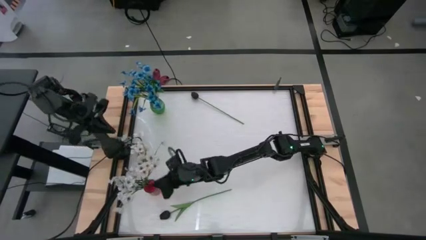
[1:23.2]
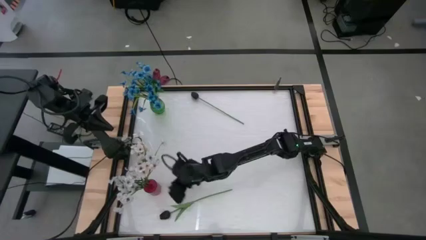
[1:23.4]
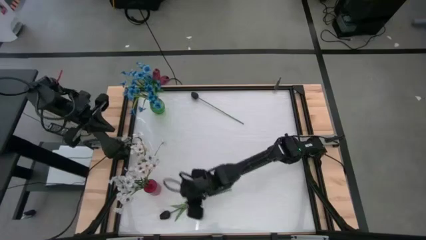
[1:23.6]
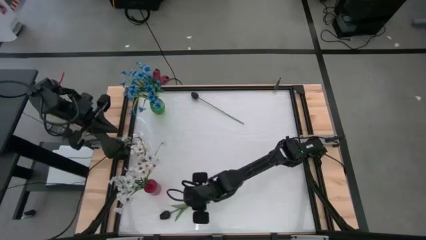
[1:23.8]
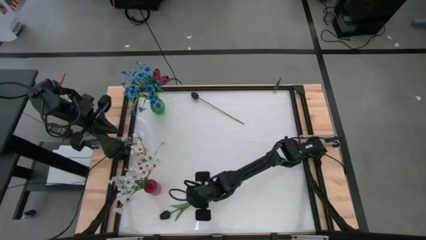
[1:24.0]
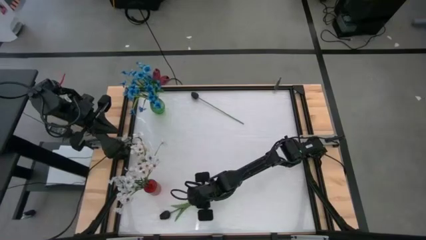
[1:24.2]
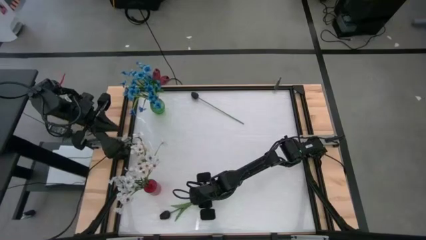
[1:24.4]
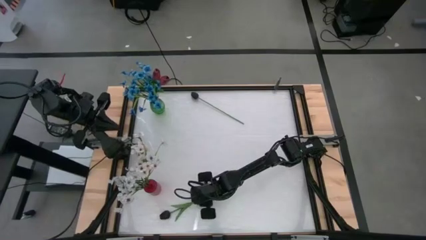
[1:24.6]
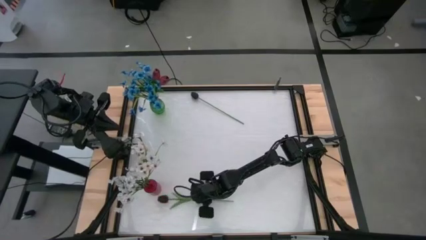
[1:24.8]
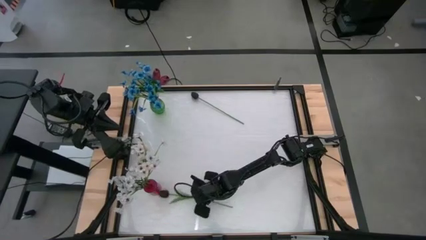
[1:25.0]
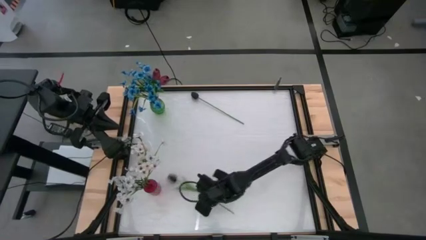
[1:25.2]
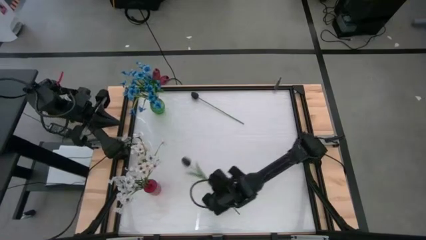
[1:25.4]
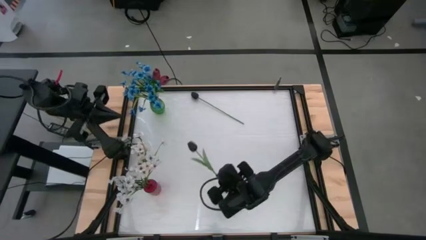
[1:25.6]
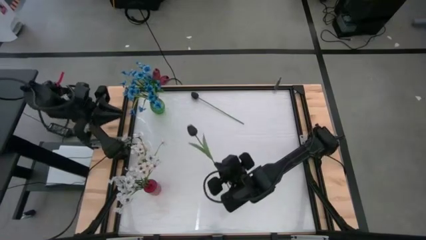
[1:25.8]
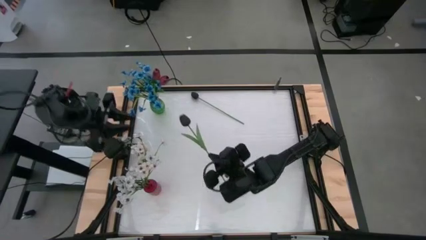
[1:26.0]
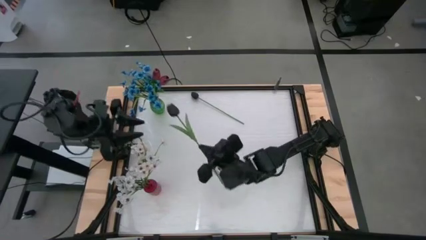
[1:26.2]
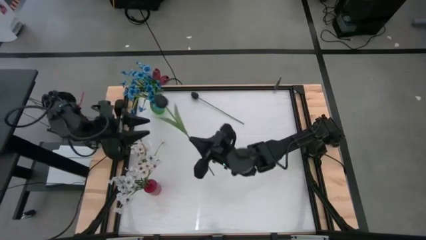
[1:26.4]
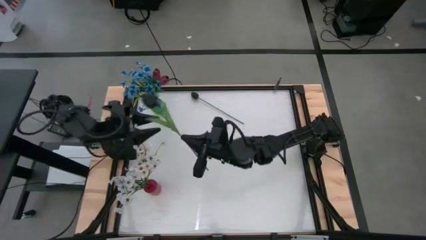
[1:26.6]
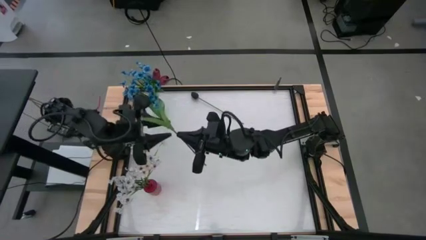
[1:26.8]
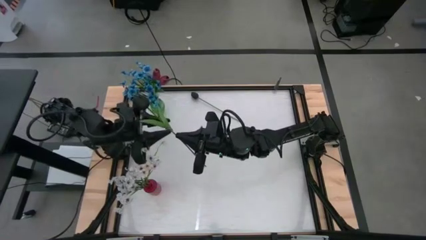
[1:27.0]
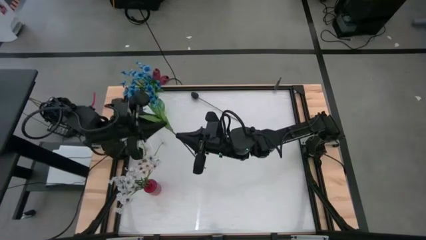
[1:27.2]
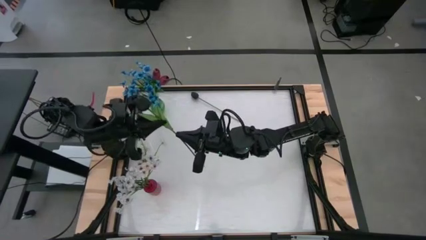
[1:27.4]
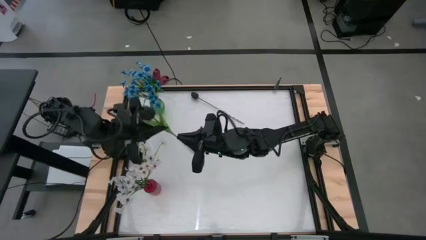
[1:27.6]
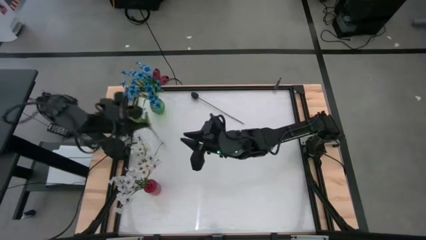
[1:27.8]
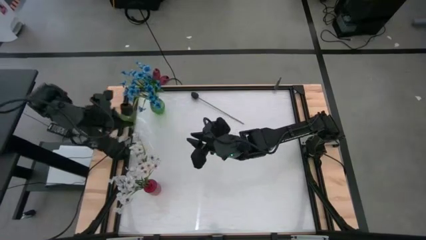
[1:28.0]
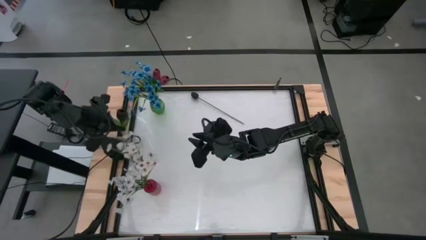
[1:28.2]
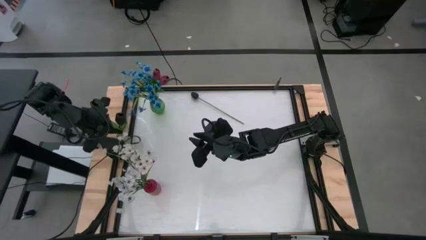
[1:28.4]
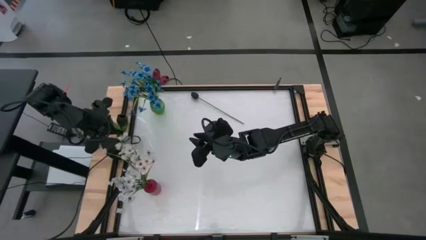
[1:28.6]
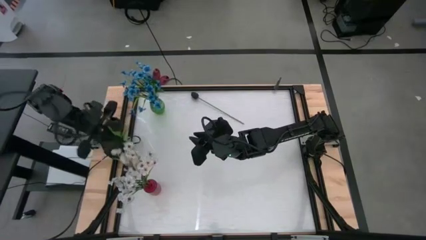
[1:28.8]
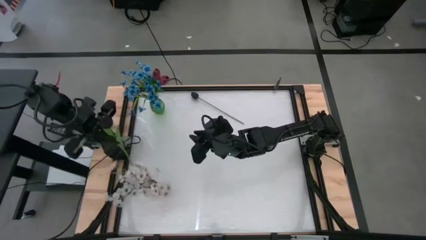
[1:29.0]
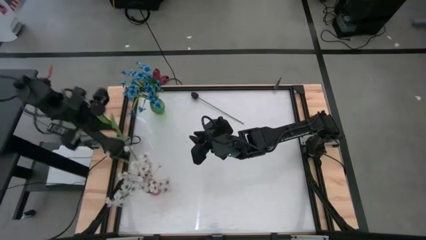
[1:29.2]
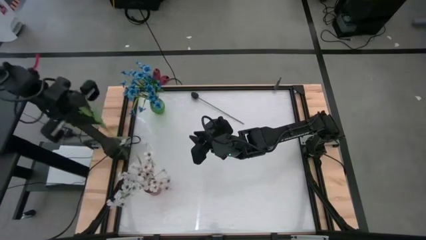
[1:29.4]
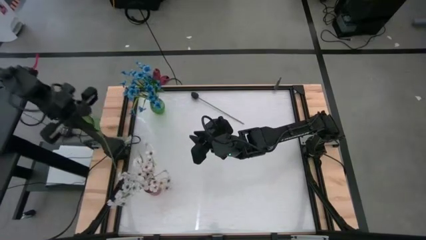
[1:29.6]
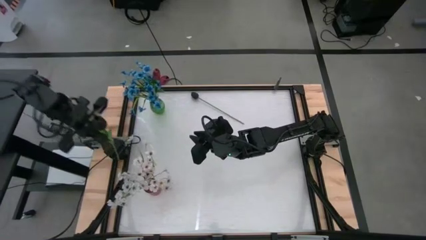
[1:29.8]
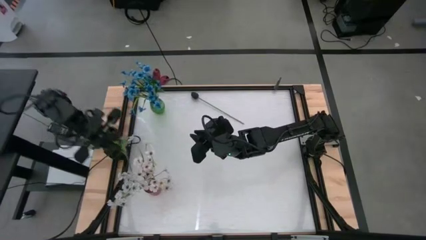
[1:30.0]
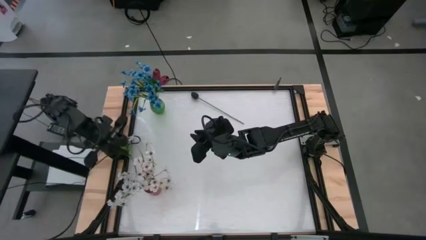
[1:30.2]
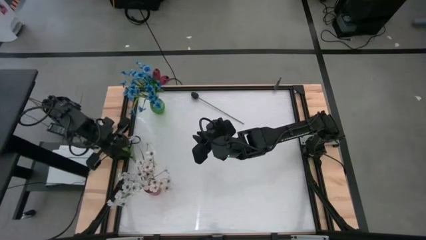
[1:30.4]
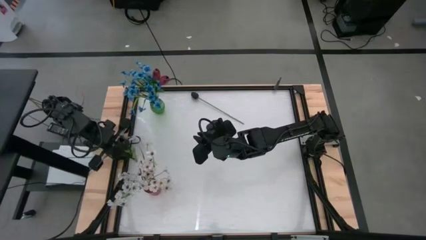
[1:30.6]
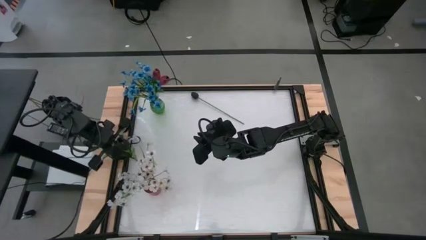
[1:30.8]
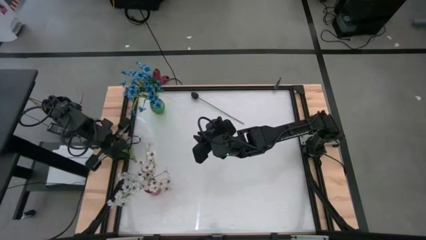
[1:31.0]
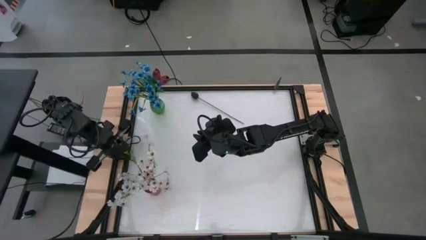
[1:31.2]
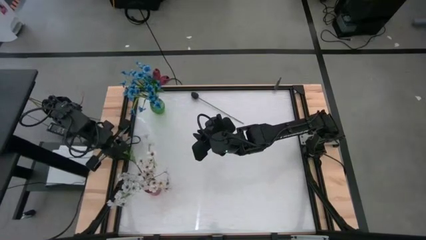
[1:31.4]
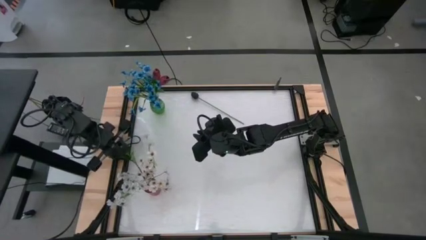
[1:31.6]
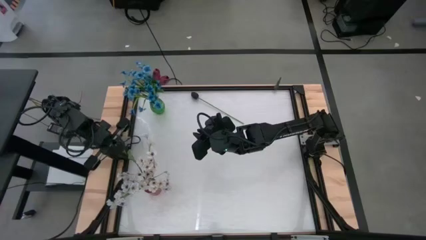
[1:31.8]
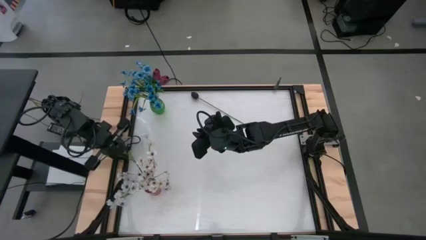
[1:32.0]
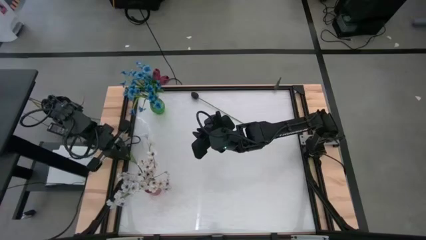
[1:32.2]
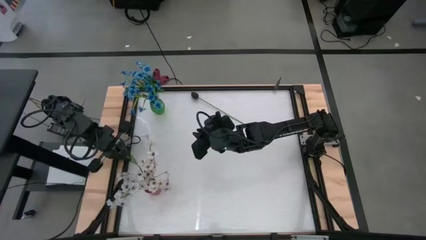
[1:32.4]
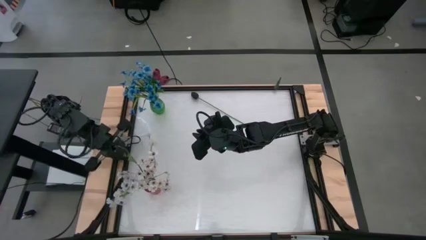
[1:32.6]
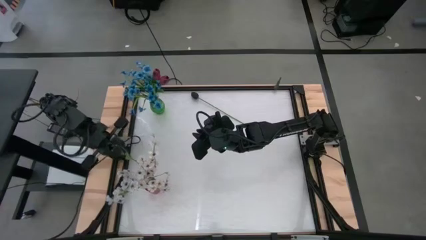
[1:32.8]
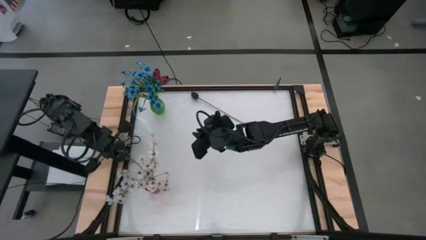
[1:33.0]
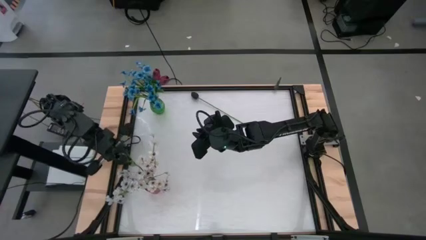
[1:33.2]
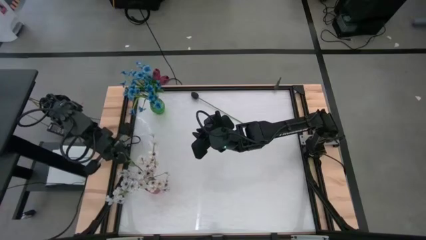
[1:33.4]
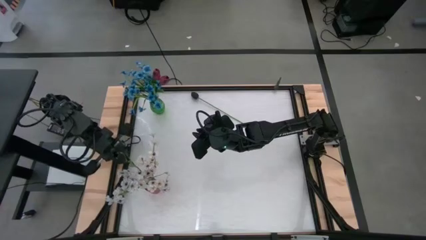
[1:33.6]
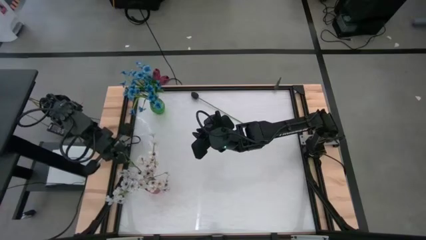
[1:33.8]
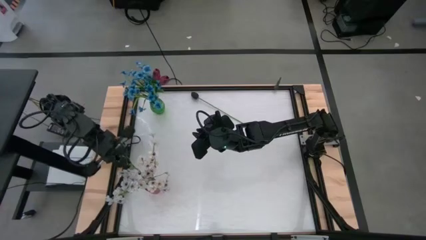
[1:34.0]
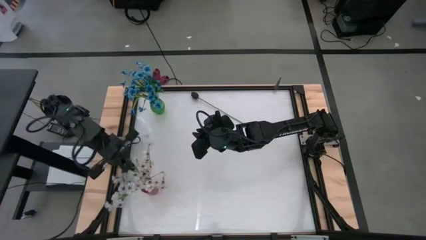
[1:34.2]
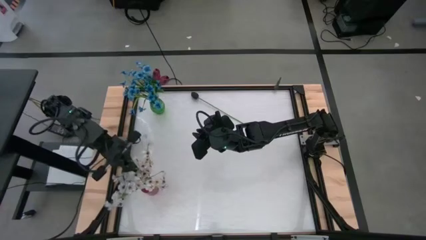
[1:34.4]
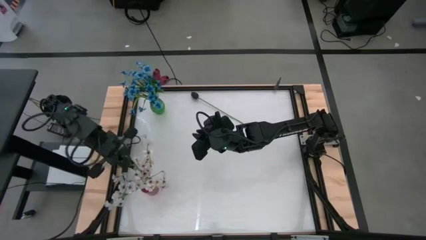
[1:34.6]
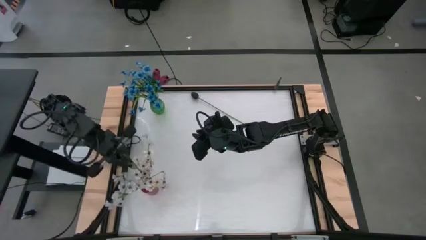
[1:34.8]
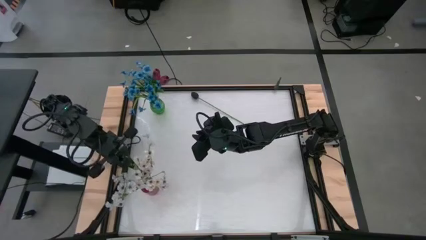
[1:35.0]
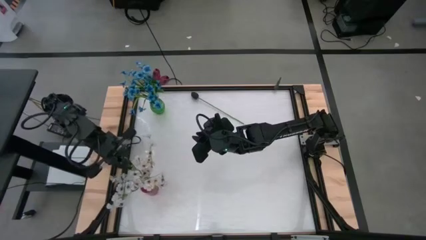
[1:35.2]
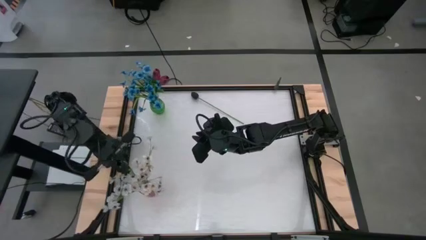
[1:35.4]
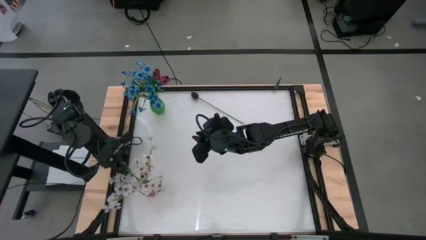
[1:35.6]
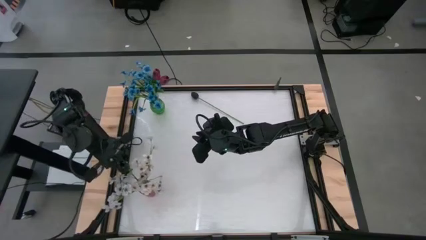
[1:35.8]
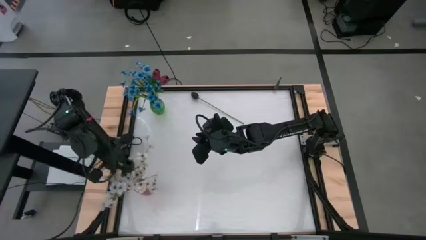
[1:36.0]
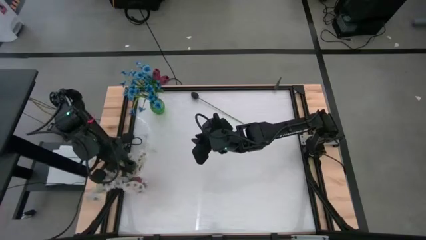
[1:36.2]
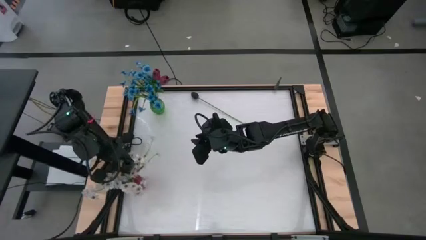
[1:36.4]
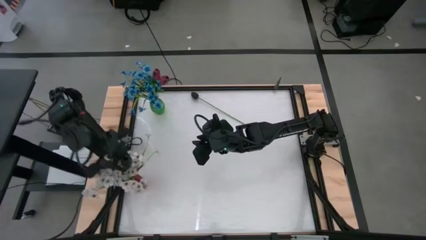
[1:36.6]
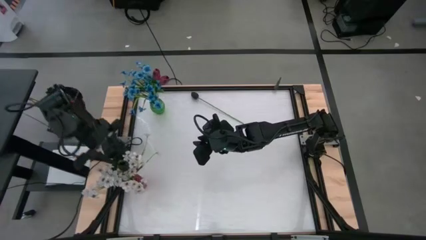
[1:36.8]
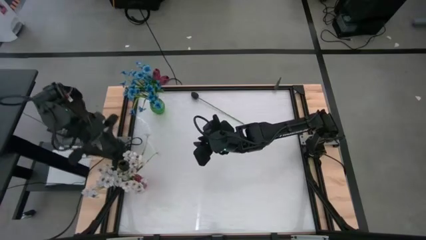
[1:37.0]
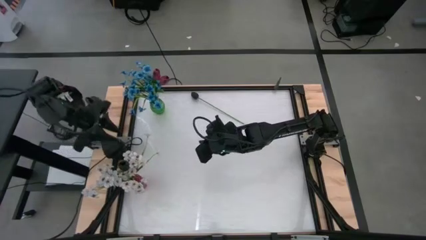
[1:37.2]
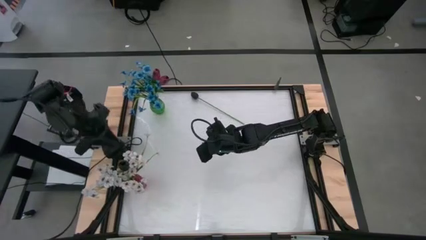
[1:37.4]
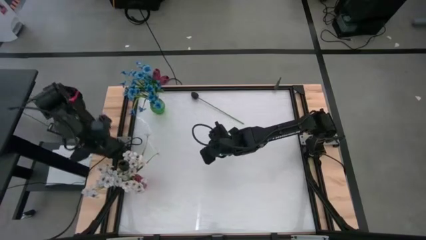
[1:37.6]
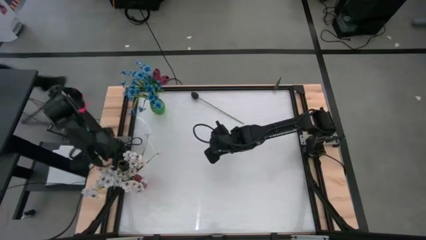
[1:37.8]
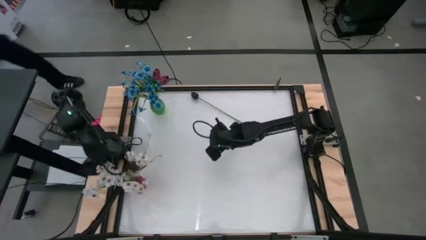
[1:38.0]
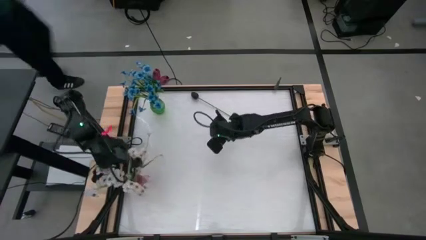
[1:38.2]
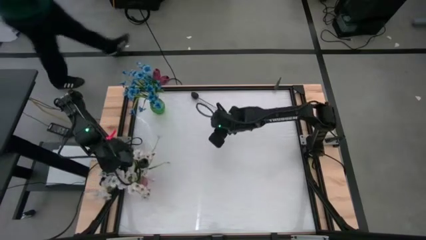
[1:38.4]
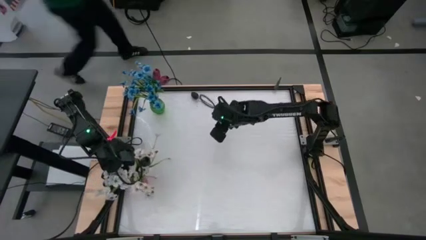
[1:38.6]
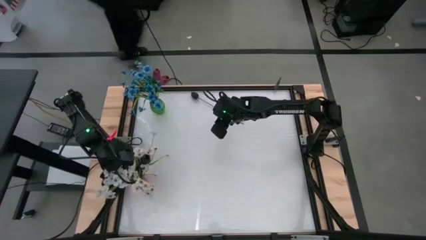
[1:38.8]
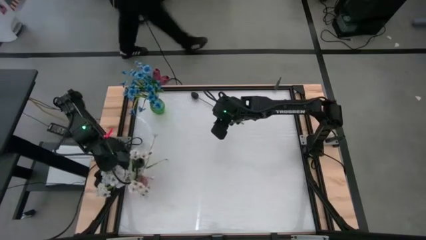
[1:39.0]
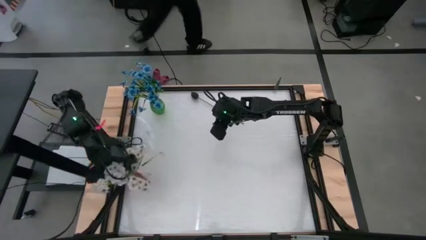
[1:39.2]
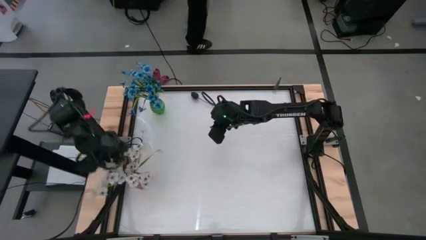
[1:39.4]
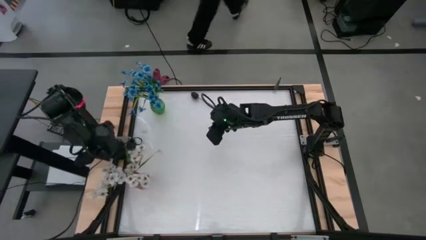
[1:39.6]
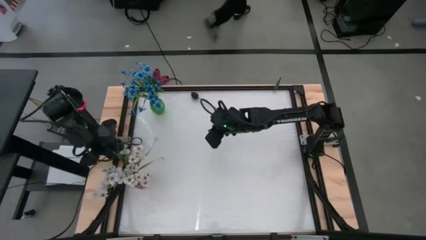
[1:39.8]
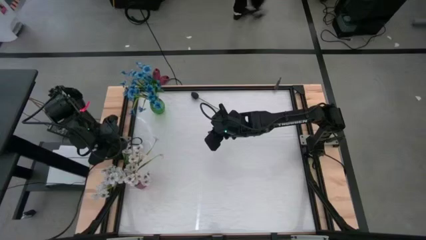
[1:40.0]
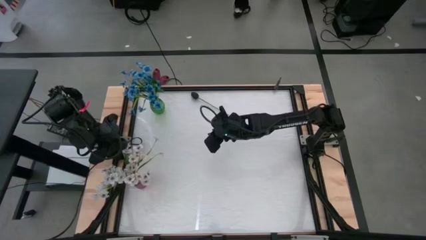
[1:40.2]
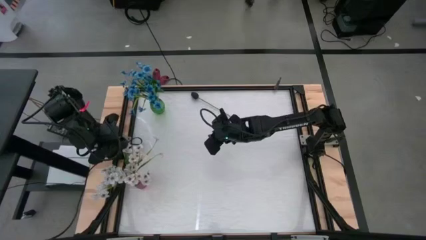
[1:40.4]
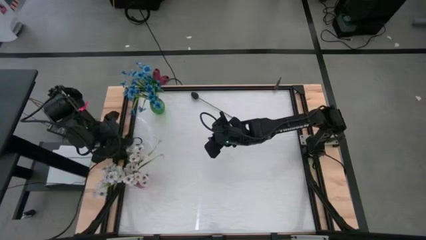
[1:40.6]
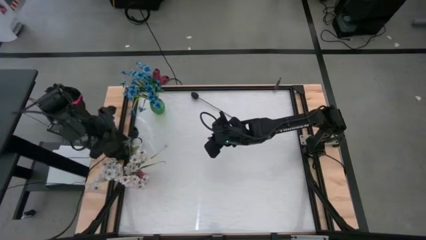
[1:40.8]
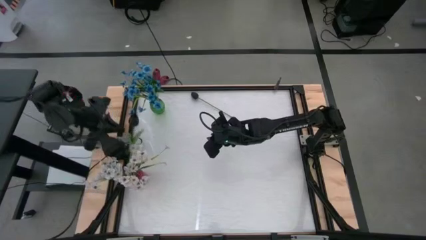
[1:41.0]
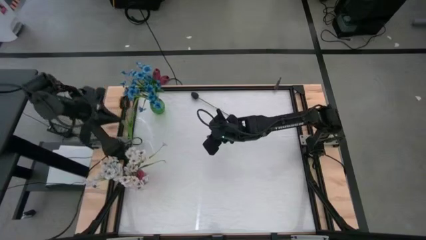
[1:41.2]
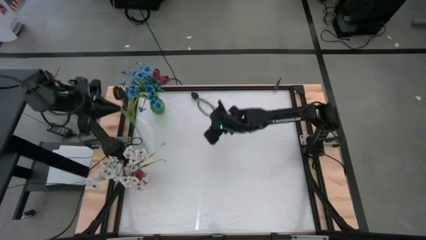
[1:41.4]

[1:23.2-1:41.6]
Task: Sort flowers into vase by color
Put the bottom black tulip into the red vase
